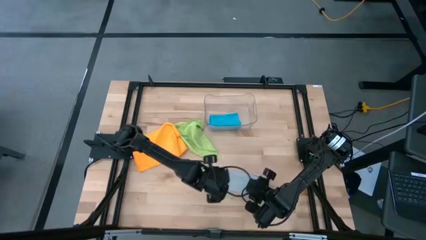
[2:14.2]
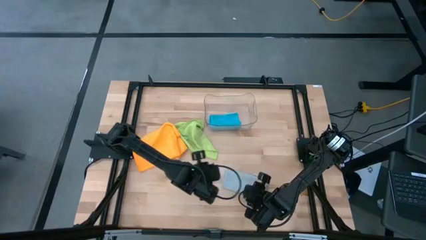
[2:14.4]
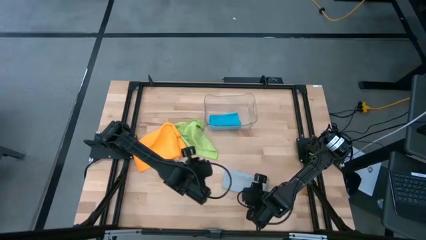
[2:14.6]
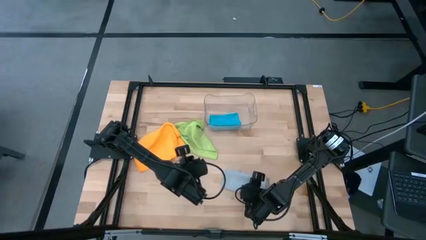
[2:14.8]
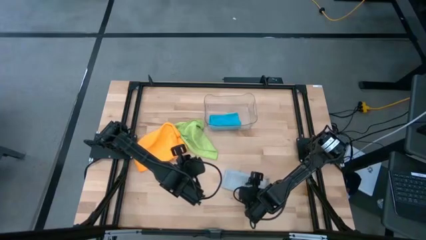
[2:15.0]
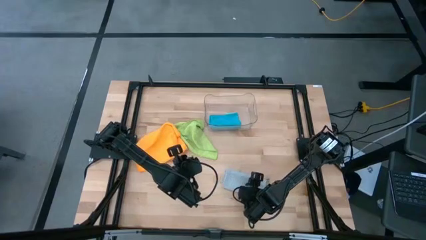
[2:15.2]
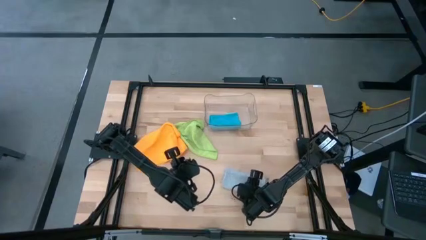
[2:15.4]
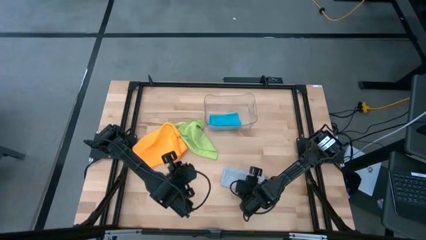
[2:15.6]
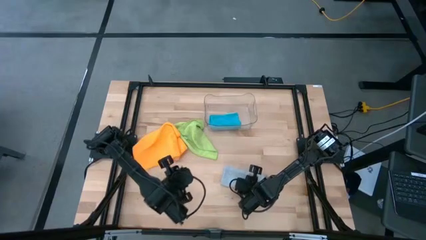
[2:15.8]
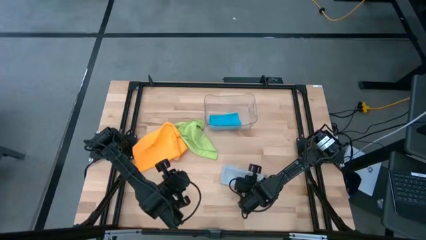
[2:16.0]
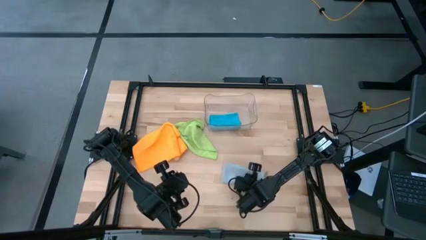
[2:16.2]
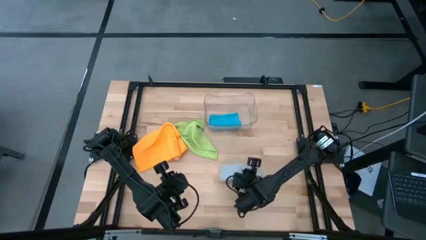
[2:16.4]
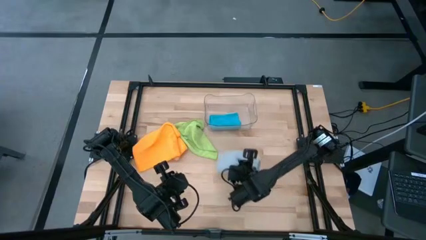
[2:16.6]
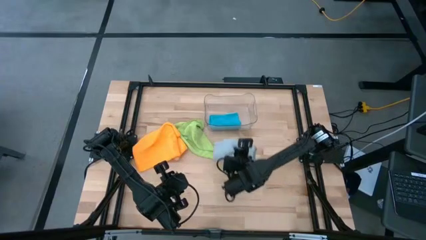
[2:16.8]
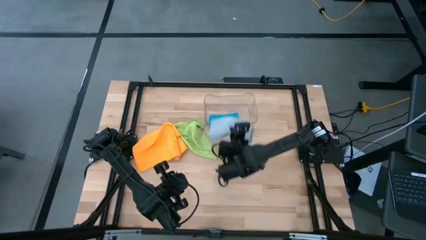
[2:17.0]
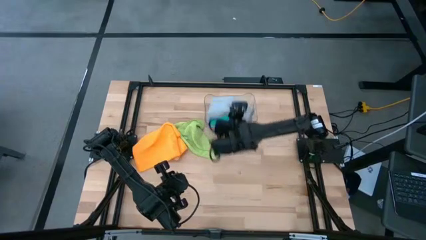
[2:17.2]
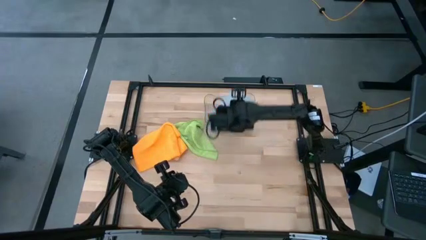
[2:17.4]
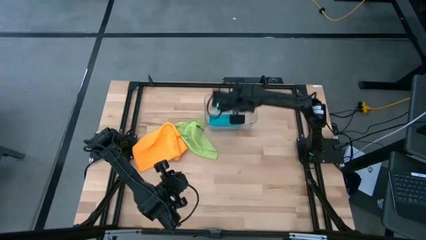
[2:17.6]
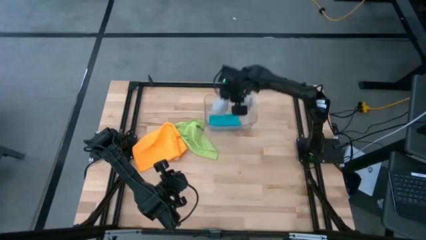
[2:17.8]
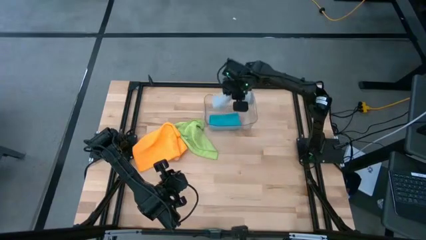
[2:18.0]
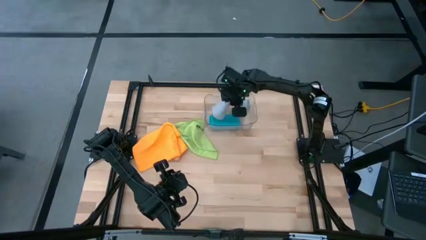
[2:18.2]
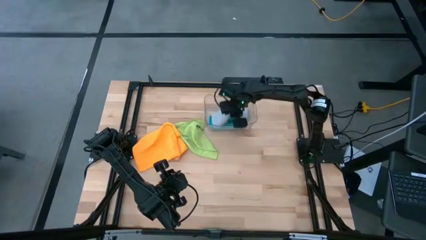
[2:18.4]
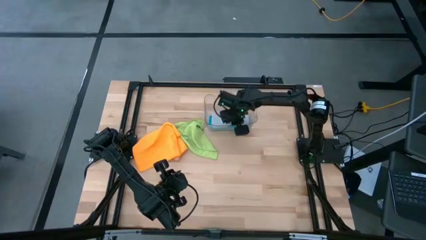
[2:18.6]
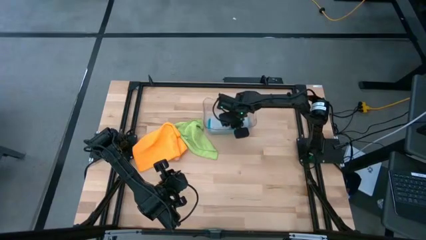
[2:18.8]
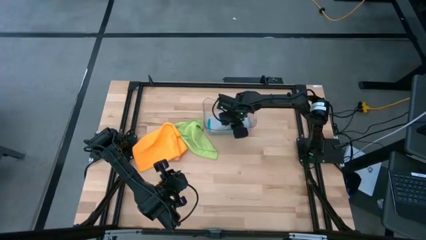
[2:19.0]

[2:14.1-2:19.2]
Task: Fold microfiber towels
Put the gray towel into the transparent bin

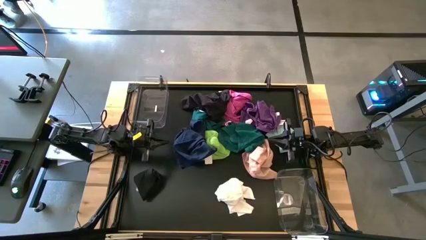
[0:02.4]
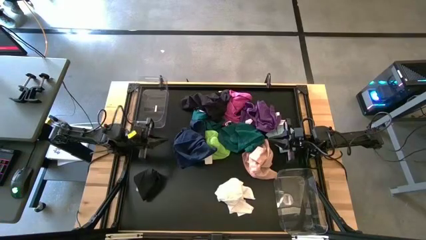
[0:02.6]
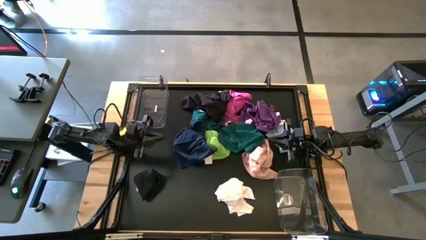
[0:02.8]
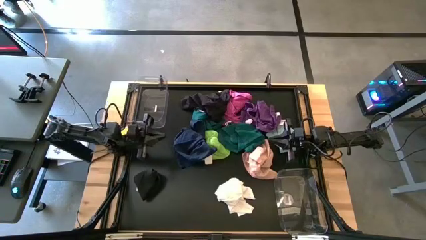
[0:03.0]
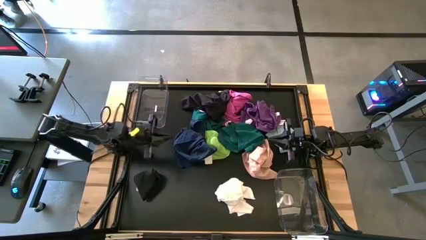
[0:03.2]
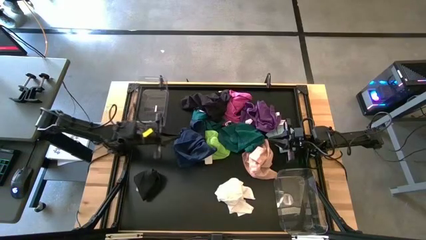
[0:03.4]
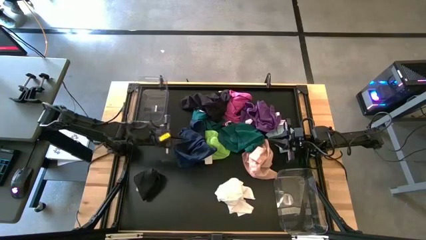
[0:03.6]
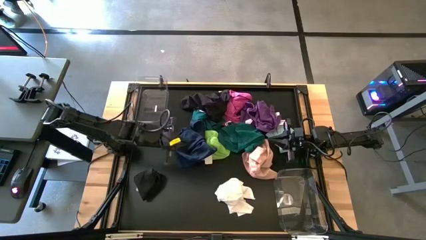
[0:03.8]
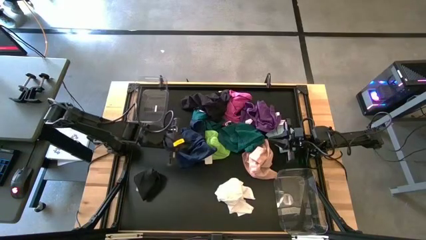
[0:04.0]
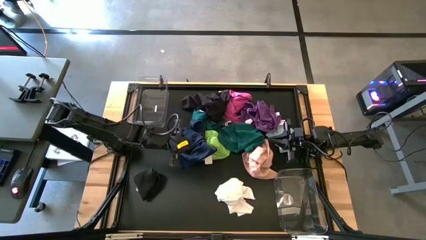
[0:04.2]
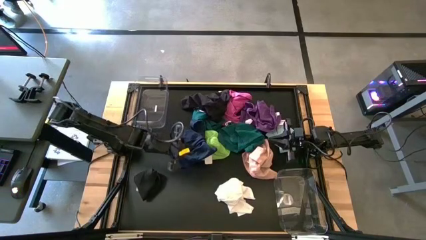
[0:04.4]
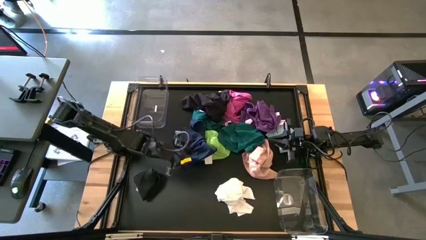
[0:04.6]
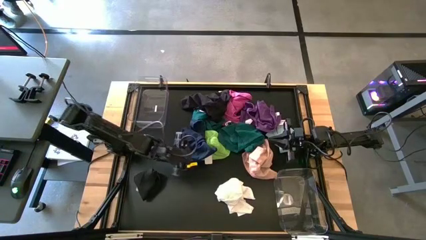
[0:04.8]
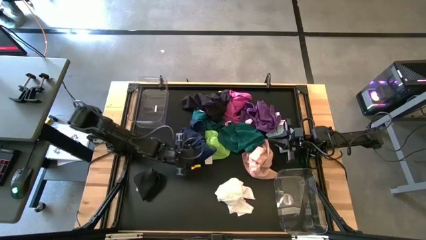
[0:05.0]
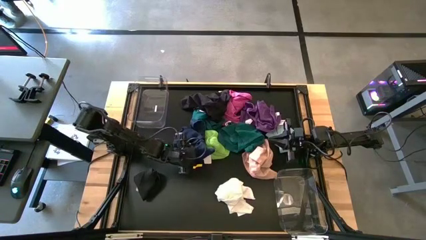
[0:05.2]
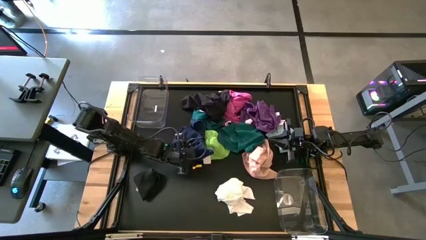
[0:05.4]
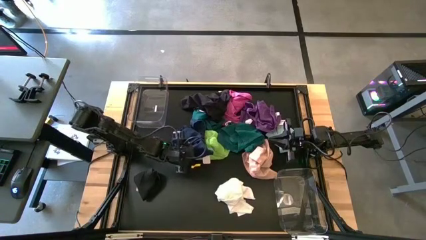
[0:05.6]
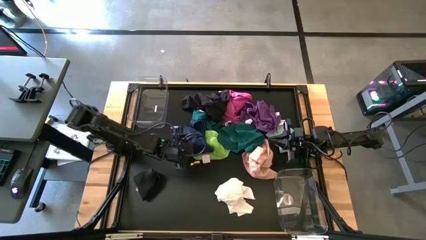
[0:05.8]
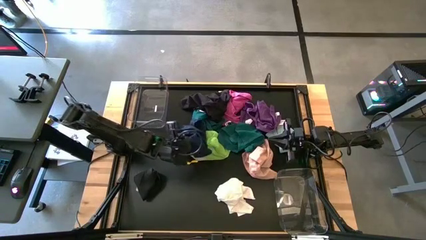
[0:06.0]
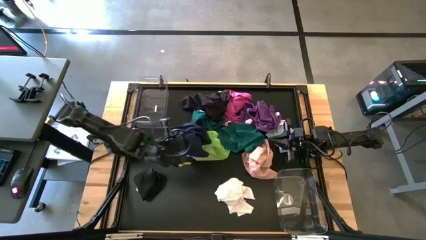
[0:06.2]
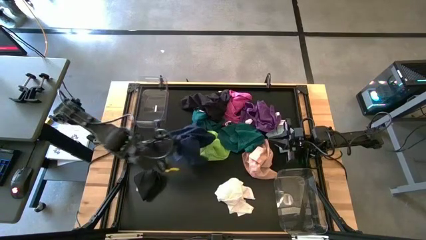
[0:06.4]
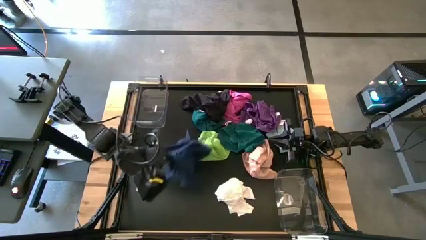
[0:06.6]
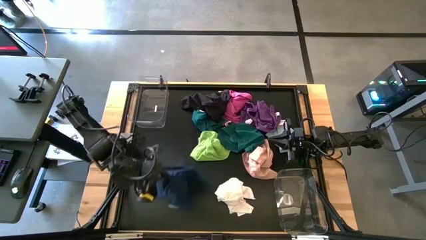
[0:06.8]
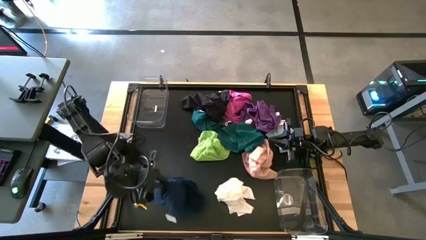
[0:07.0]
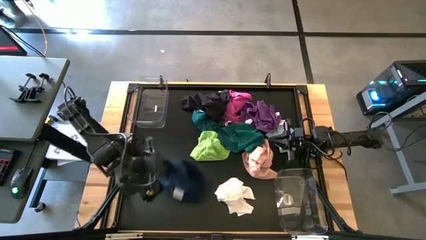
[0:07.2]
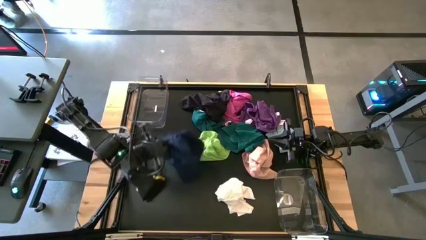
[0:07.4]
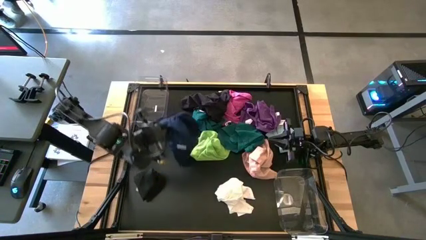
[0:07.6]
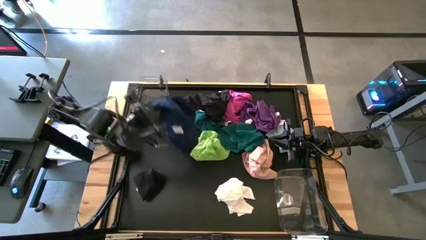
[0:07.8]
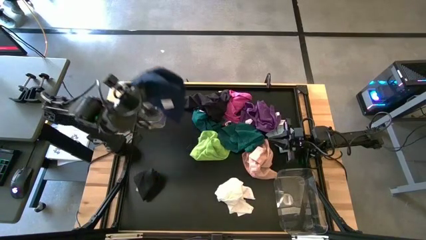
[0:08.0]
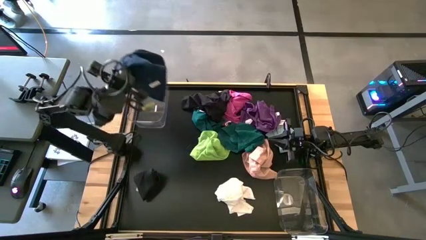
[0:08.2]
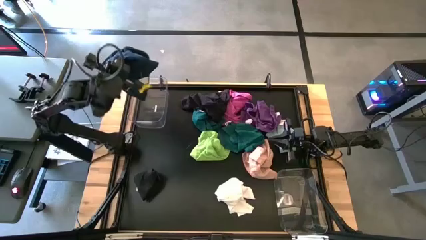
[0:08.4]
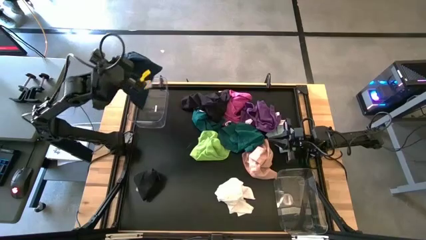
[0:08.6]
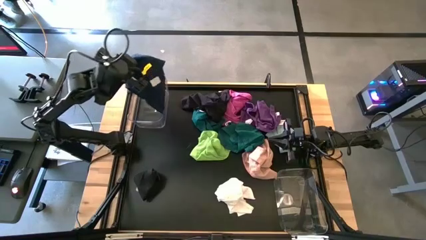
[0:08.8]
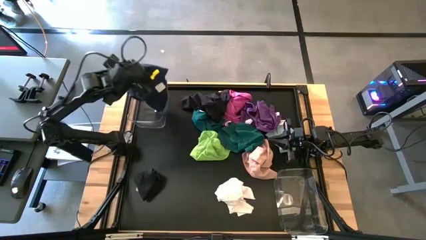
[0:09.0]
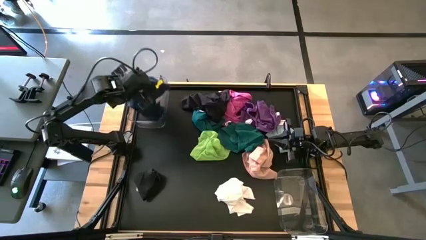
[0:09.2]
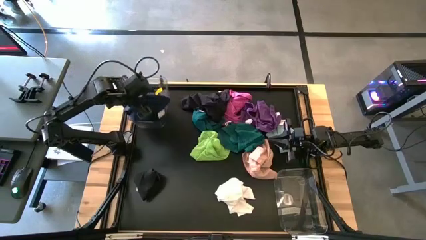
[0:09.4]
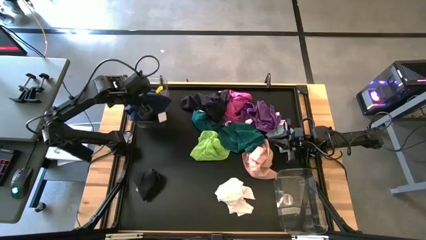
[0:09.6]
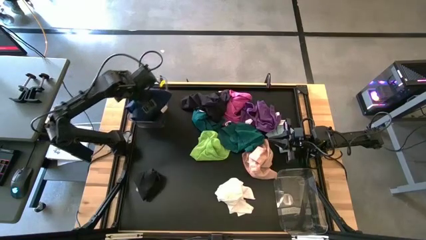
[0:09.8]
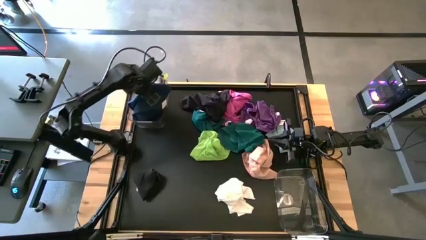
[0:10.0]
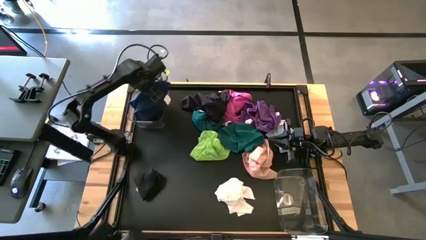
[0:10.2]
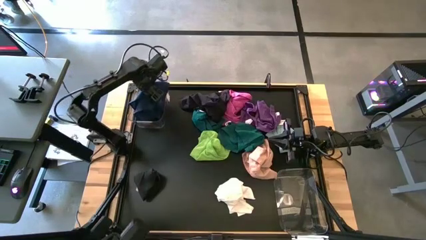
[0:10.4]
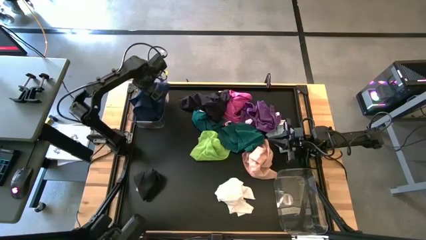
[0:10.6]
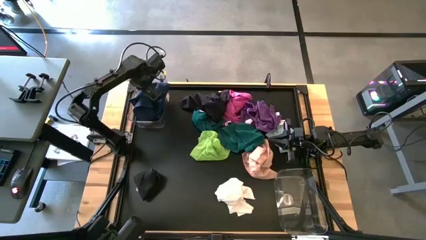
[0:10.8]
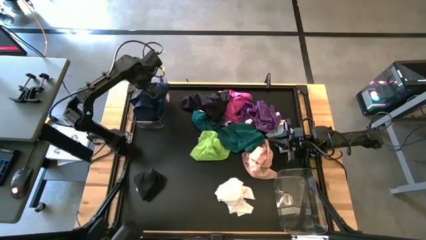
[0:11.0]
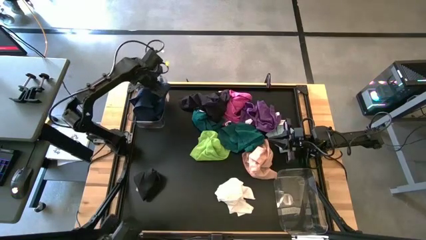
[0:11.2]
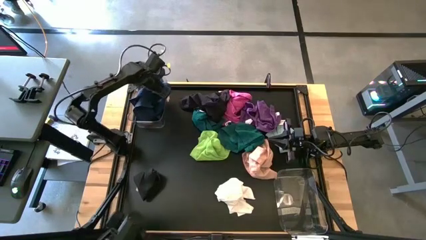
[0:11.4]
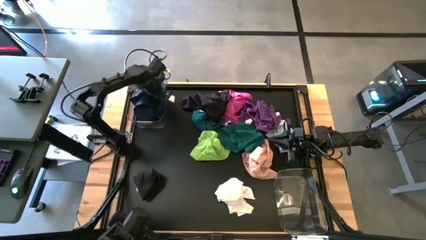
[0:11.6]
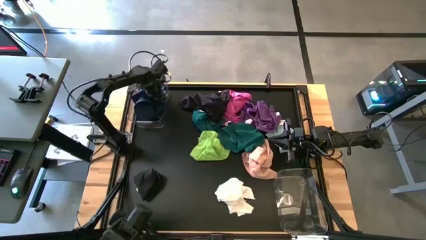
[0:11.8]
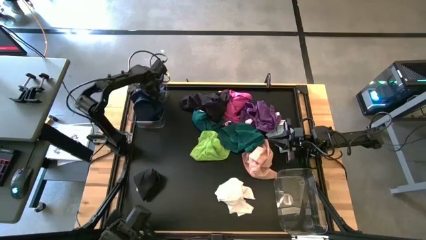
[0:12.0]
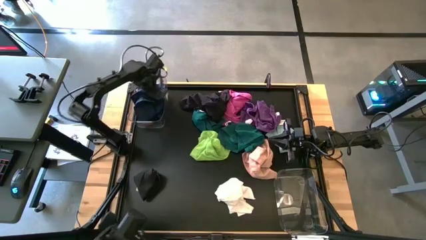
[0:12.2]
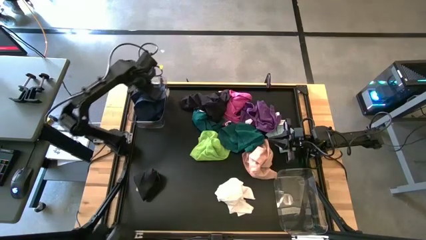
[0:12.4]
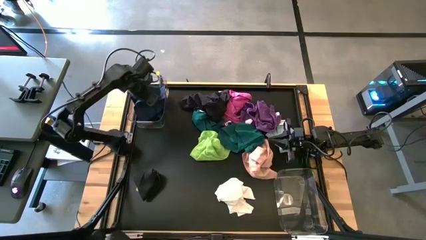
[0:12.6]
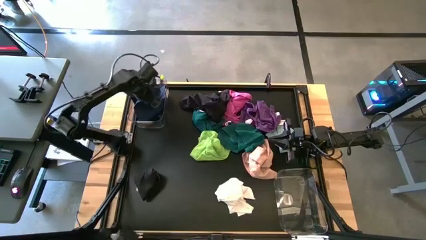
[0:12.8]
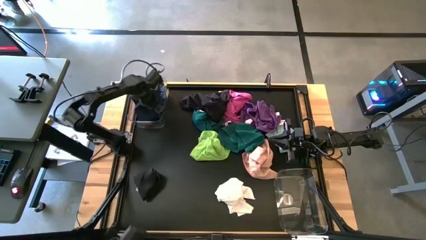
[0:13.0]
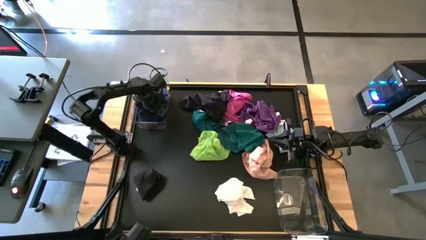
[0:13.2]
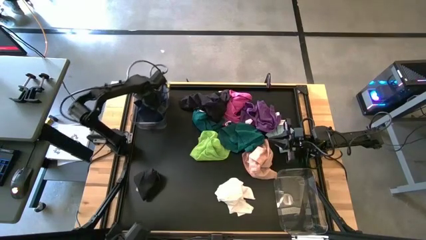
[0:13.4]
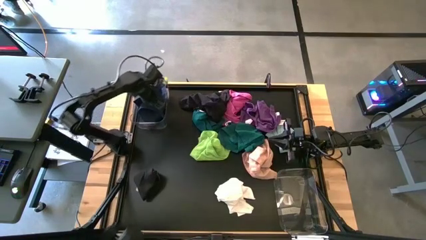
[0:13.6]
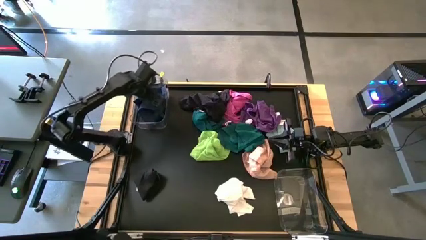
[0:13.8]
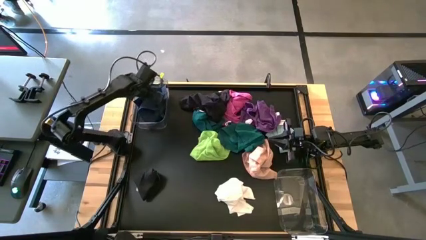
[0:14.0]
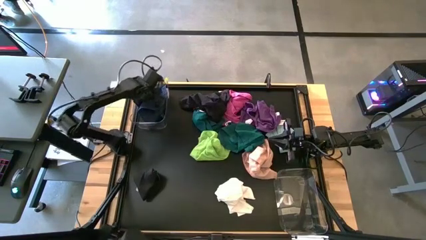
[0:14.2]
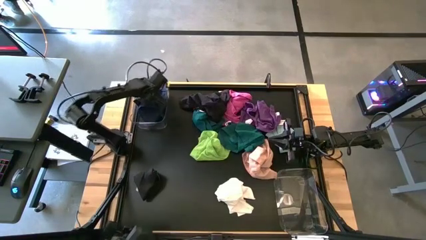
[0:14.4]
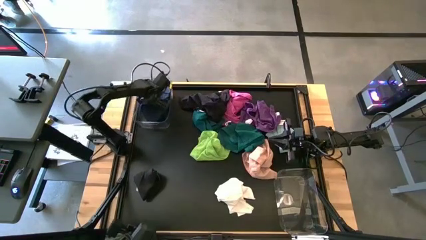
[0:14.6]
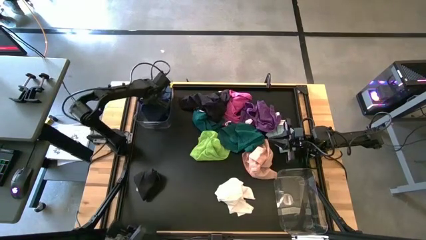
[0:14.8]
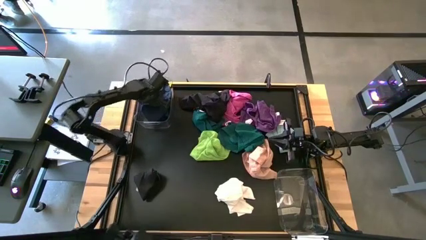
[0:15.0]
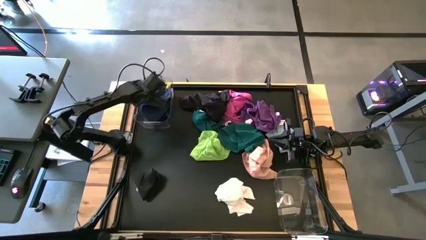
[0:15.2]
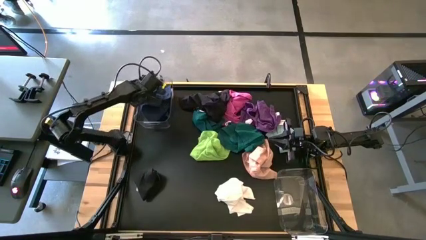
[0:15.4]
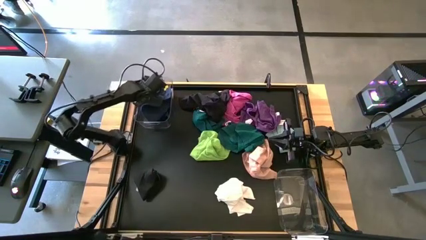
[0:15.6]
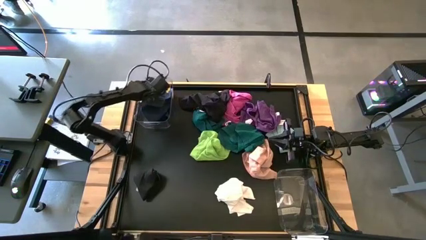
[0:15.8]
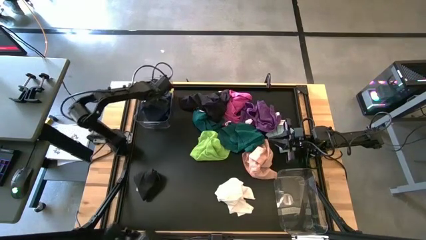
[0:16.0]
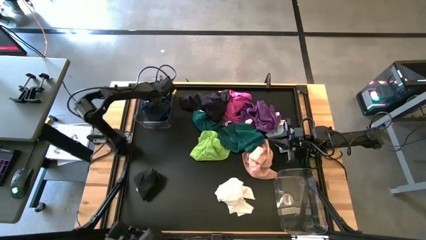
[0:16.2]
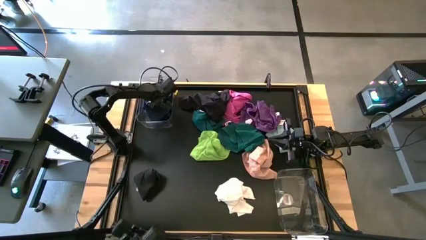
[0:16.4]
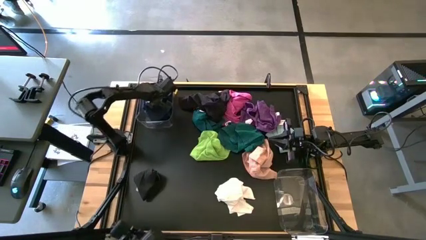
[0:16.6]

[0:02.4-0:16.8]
Task: Sort towels by color in basket
Put the dark blue towel into the top transparent bin
